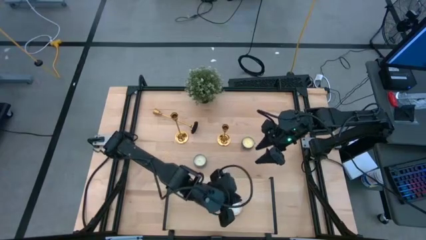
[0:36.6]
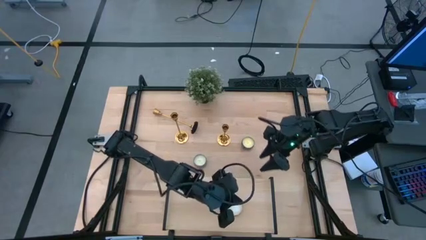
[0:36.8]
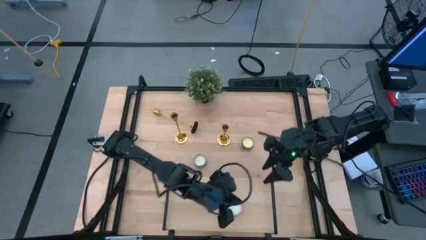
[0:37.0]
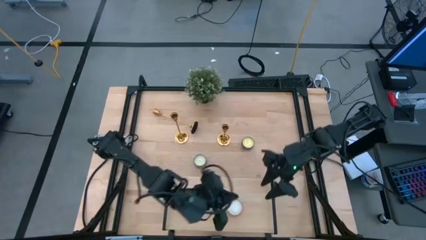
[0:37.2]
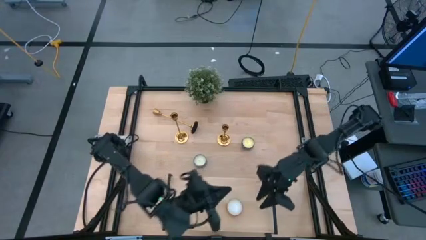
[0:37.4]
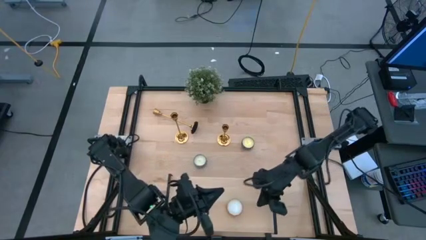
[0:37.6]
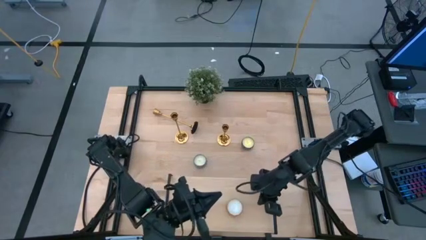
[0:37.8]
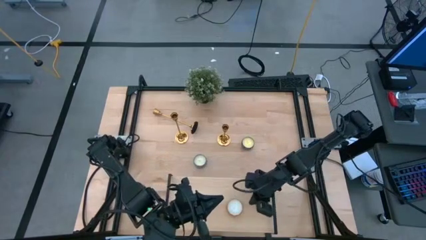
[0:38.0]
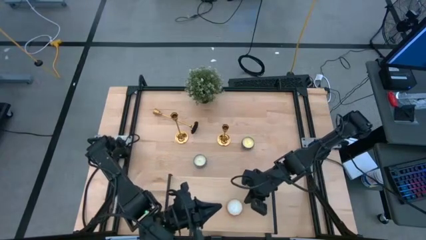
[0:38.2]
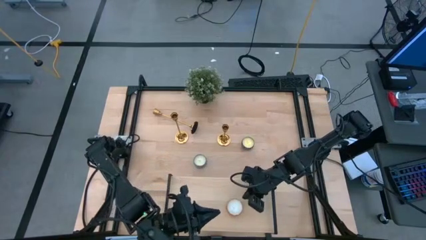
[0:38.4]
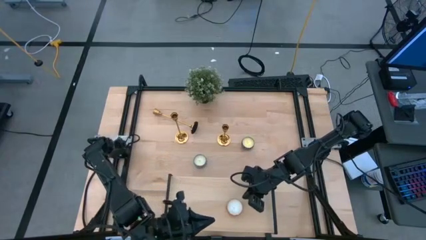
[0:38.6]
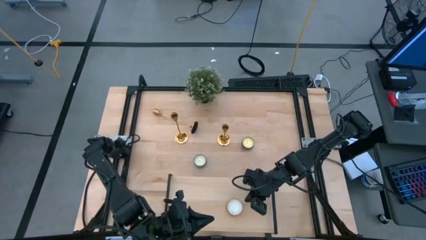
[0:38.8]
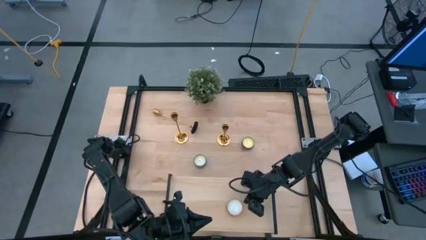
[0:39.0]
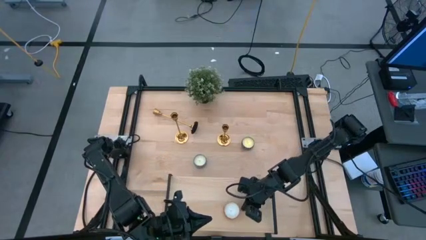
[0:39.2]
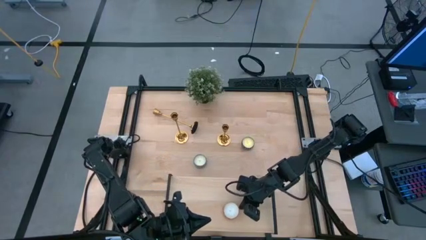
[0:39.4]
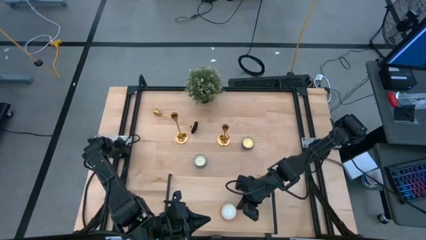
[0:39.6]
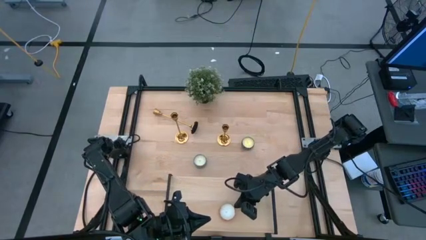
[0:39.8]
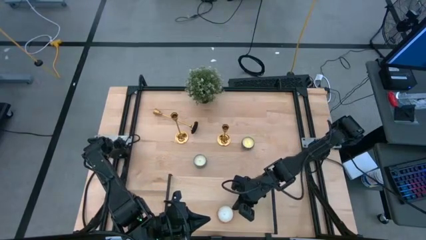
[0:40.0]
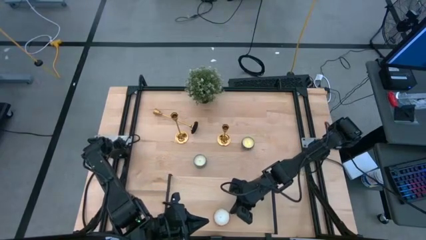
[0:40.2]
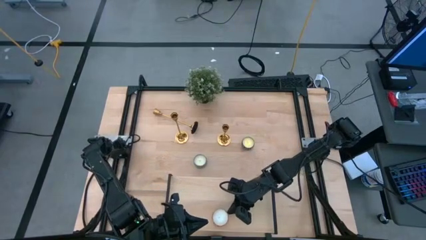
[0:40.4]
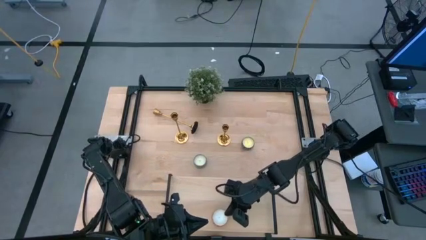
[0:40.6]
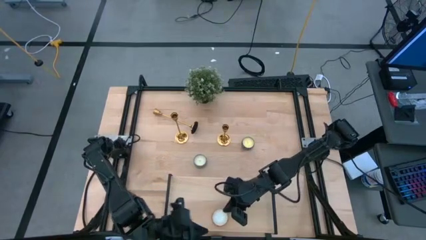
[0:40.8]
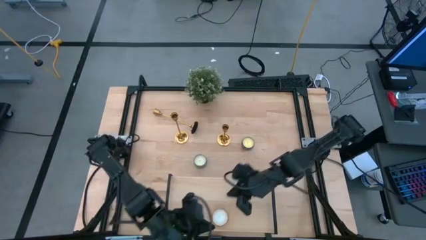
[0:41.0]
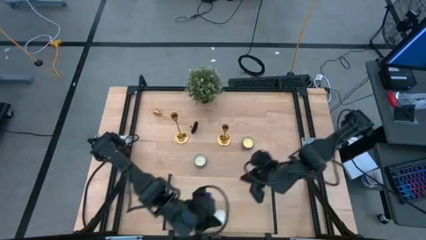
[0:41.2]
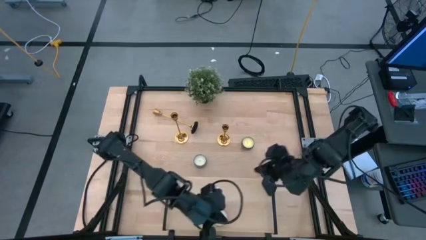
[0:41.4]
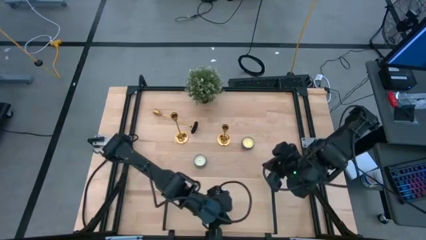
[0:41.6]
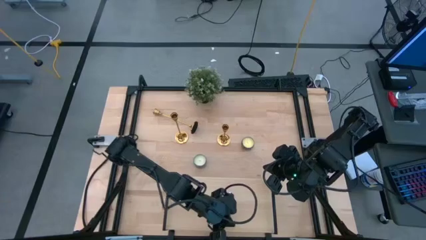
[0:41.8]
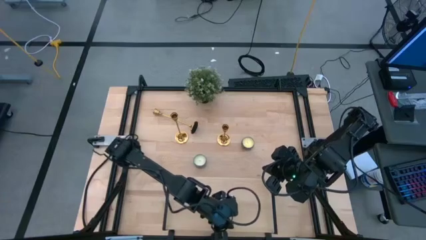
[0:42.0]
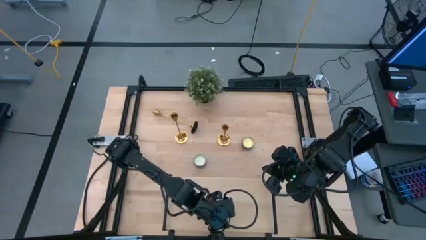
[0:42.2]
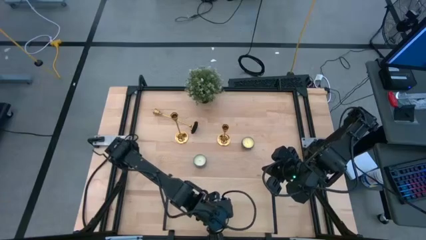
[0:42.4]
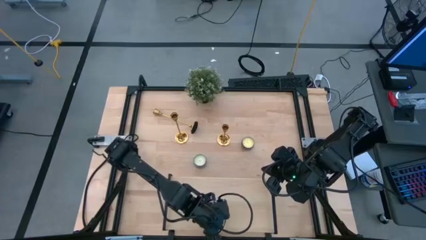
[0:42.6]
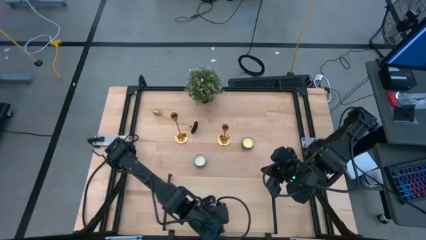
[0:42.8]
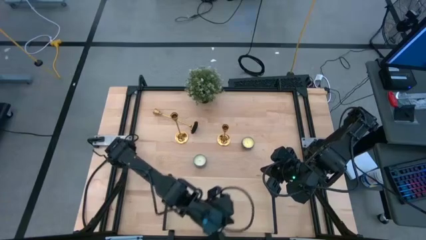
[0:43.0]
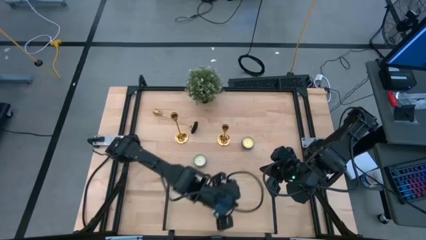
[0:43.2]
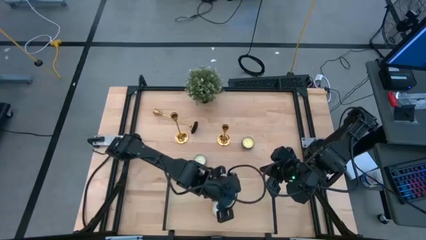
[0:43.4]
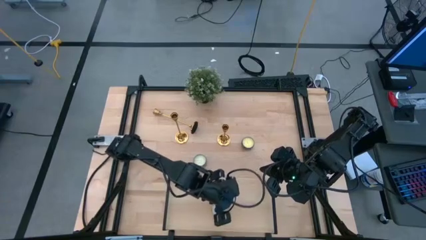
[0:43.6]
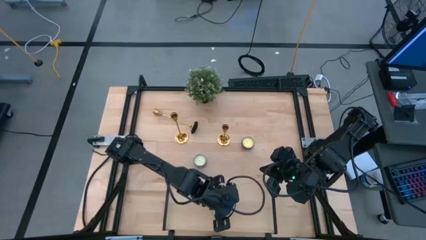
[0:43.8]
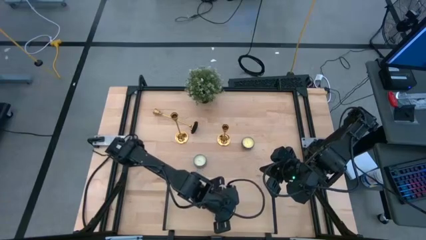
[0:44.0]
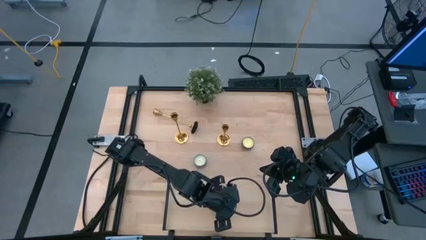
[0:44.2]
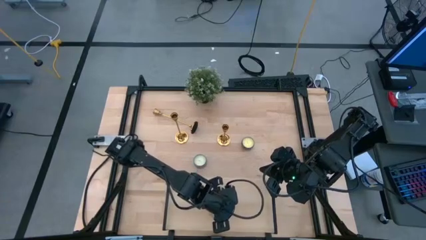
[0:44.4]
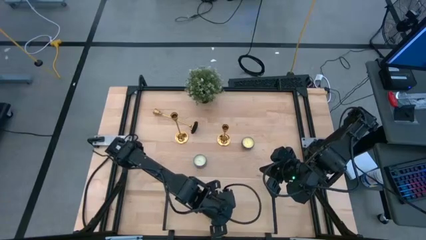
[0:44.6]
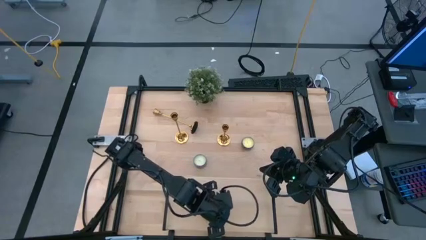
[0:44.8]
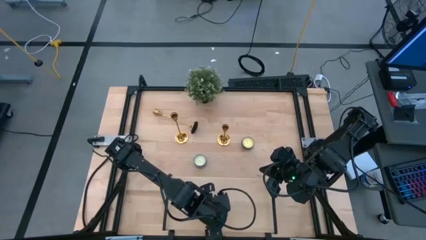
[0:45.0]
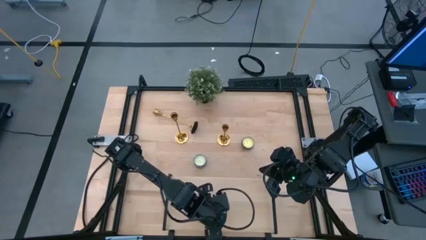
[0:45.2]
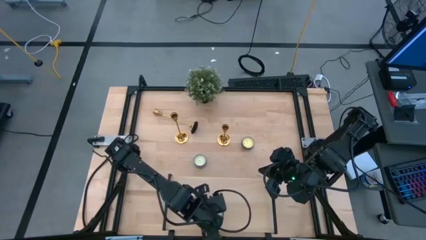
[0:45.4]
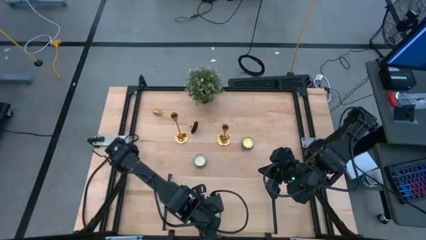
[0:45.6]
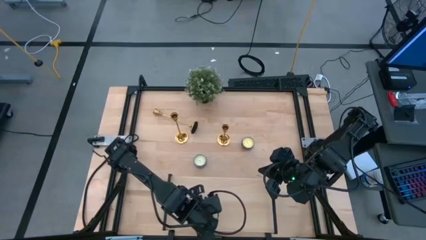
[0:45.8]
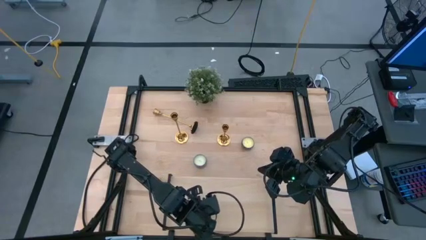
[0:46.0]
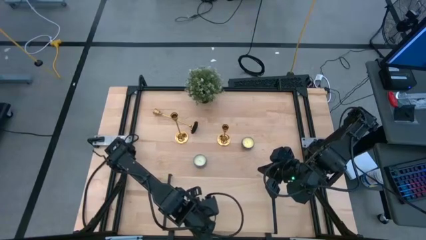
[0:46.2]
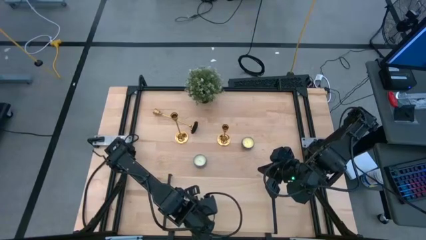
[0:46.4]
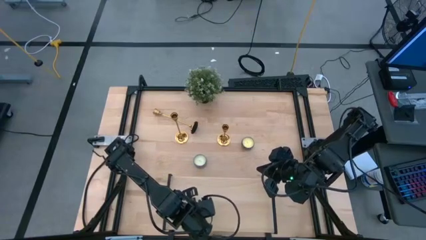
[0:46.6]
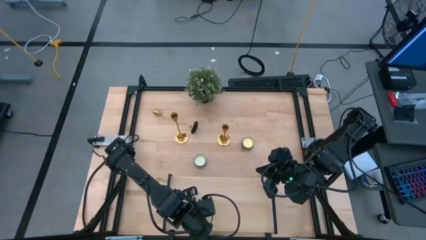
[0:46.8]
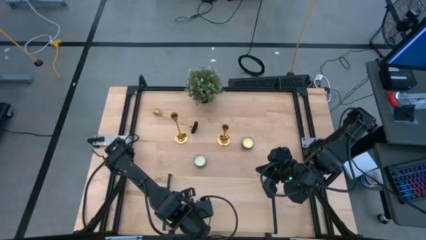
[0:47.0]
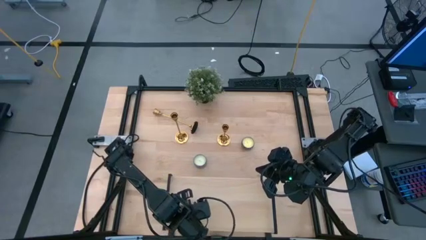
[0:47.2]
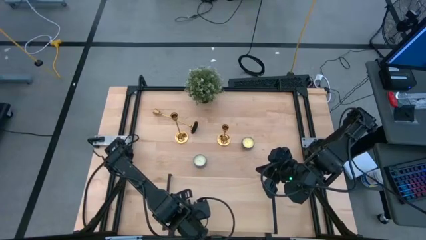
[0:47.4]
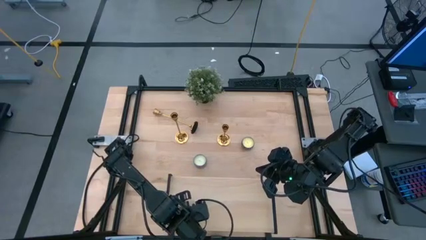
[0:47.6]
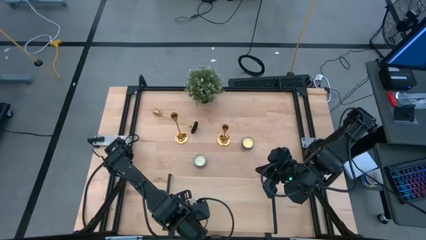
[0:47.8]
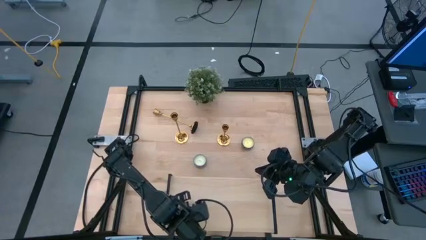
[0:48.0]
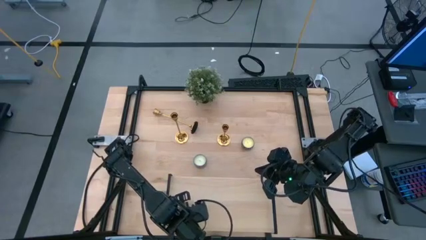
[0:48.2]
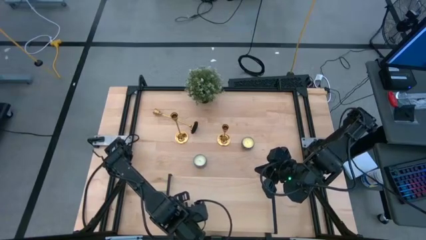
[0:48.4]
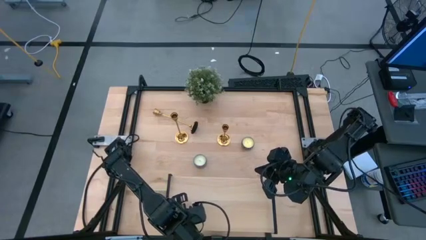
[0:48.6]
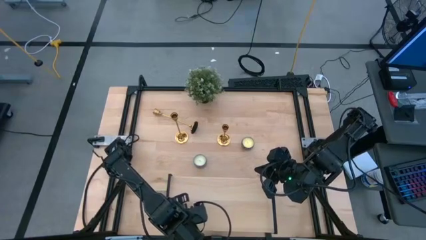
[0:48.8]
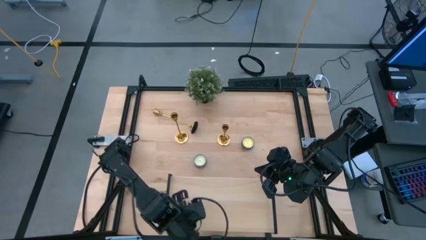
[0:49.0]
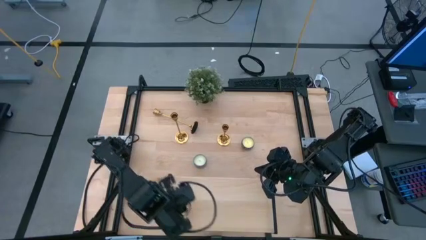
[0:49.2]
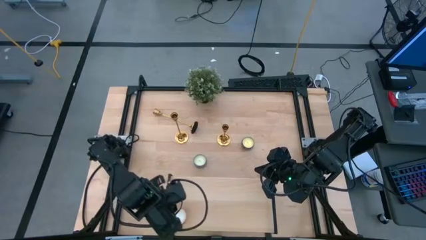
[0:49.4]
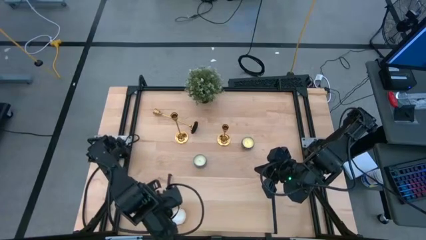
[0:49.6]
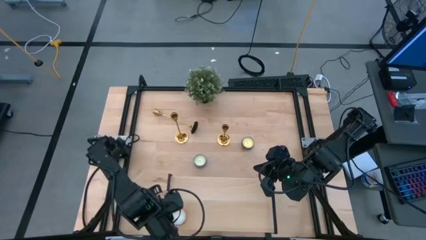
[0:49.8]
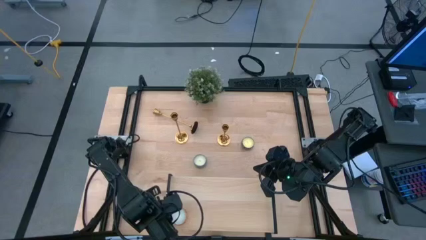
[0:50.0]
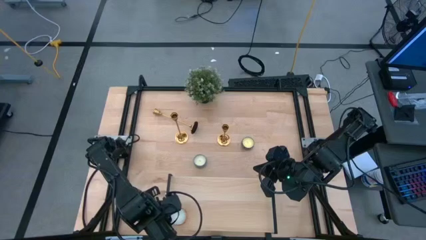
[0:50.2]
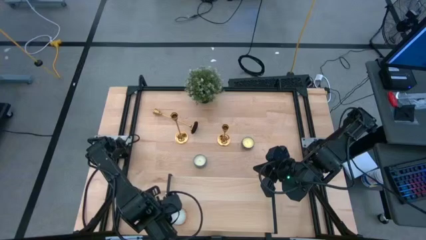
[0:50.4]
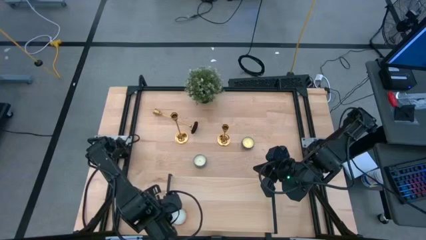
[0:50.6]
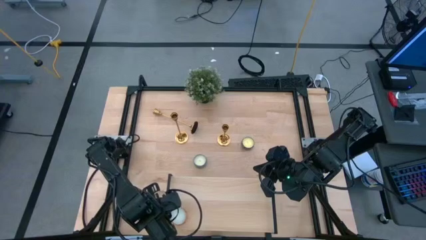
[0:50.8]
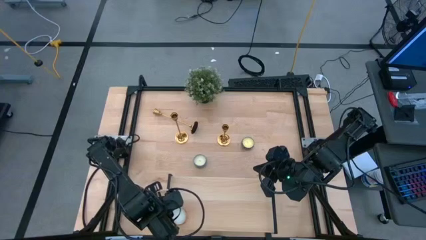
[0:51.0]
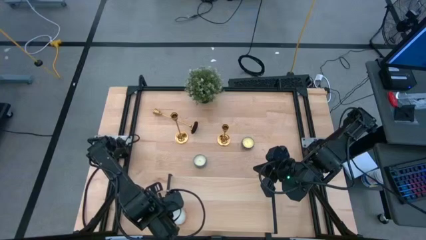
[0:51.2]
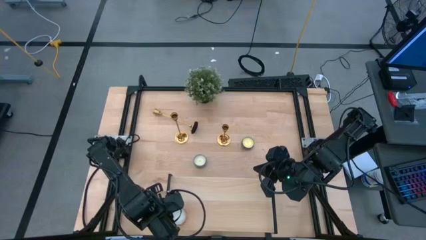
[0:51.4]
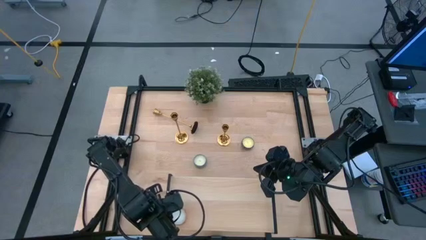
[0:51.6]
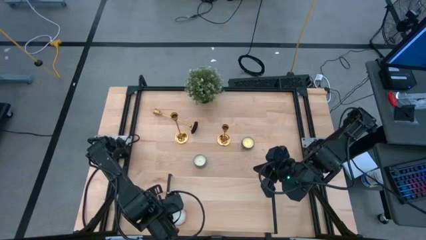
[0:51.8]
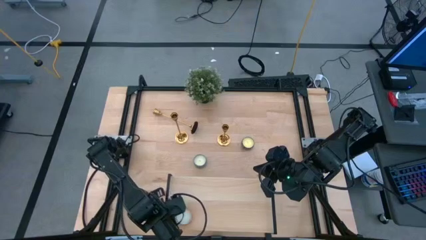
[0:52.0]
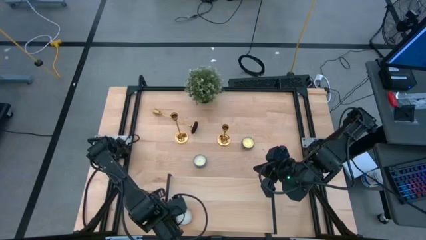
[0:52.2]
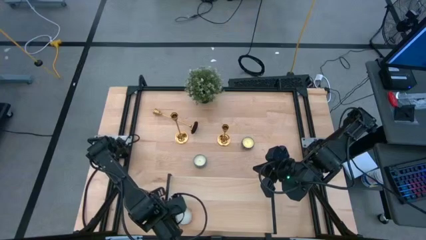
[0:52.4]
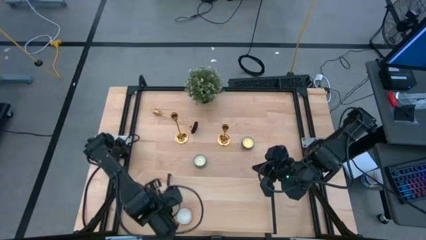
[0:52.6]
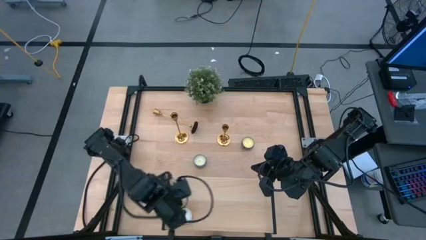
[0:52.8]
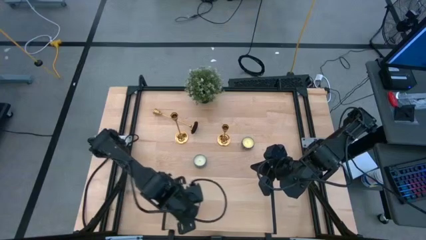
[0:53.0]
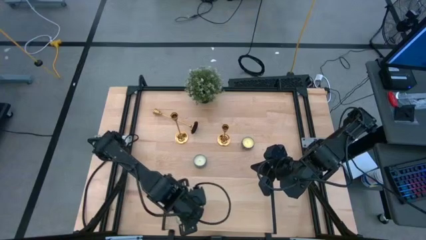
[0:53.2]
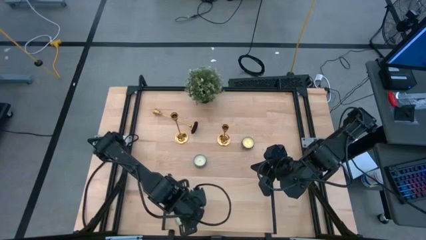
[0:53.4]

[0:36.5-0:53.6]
Task: Pick & Place candle stick holders
Put the yellow scented candle on the shelf
